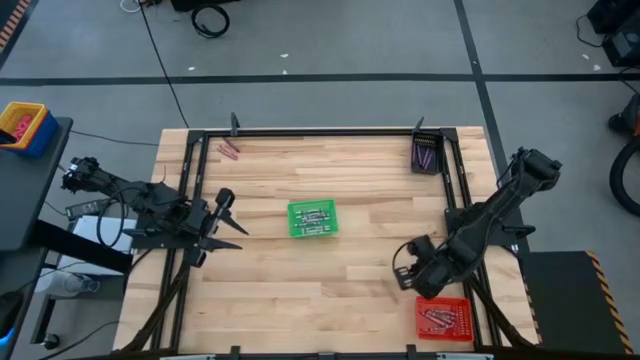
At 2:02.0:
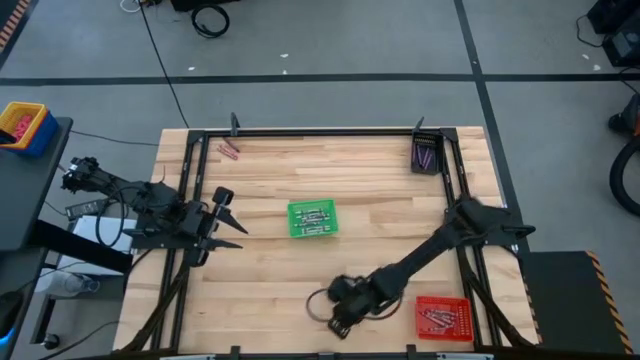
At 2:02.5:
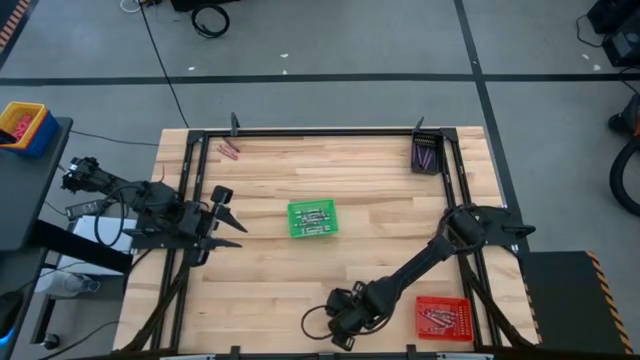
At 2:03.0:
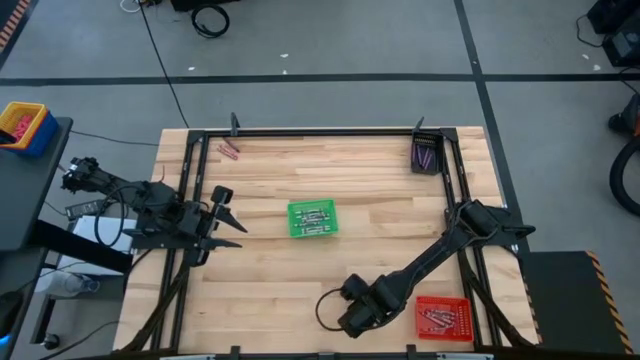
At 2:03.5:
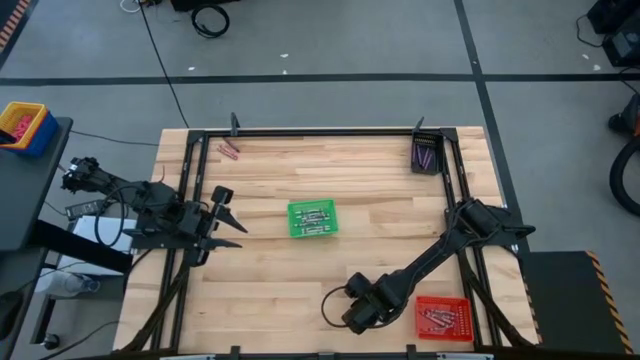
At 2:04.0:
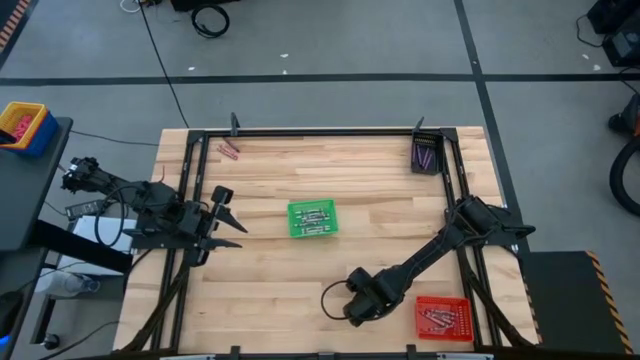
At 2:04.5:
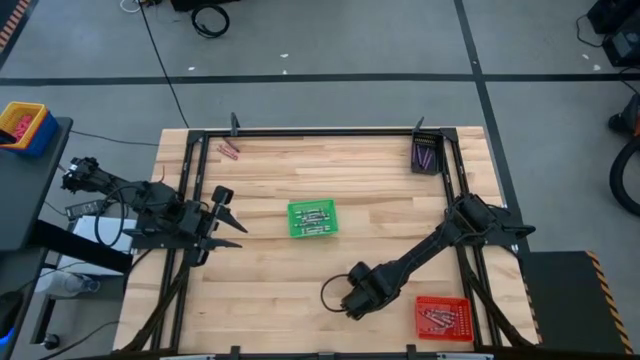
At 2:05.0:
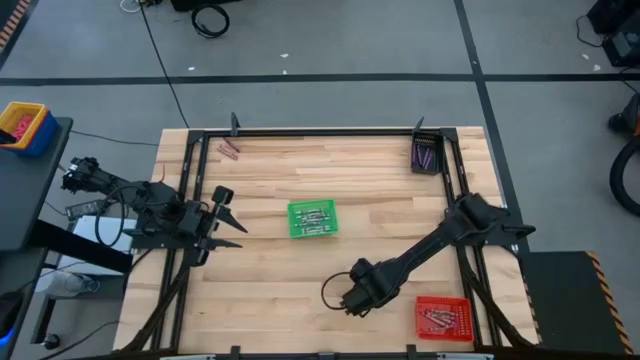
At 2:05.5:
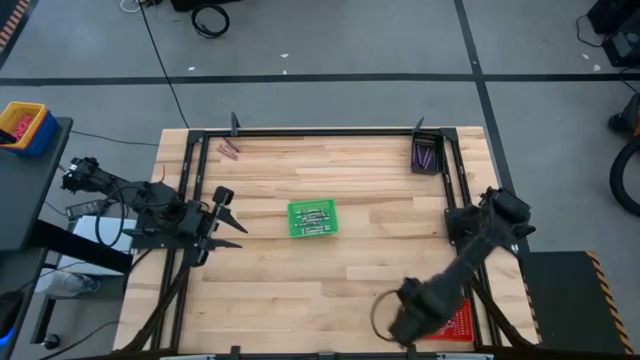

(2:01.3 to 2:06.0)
Task: Sort crayons
Put the pink crayon into the red basket

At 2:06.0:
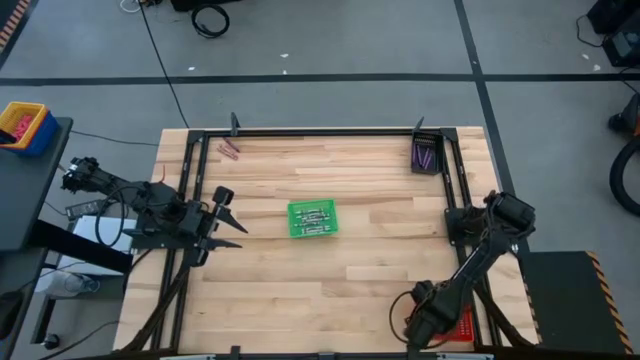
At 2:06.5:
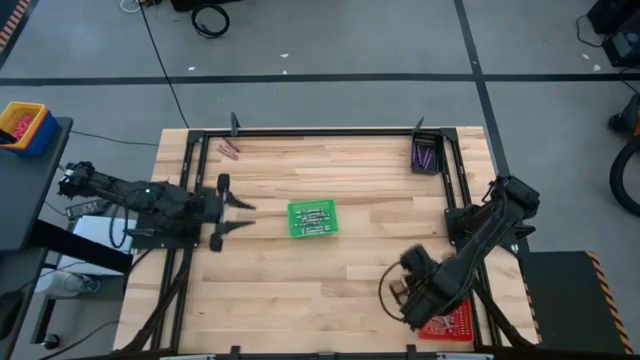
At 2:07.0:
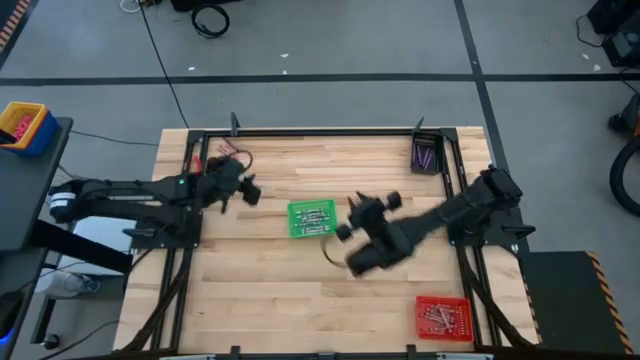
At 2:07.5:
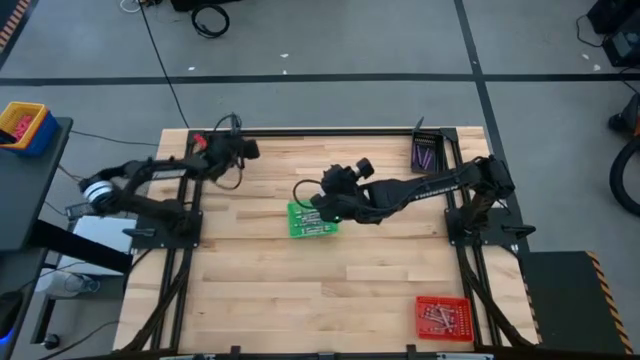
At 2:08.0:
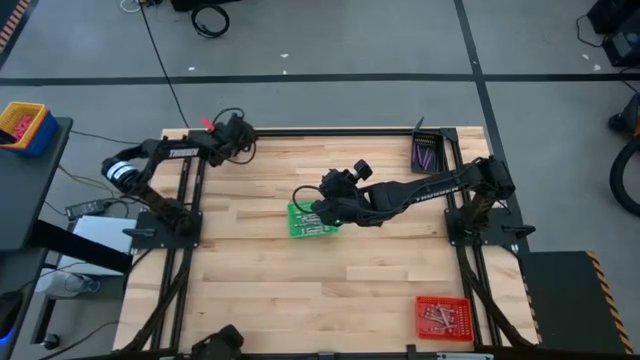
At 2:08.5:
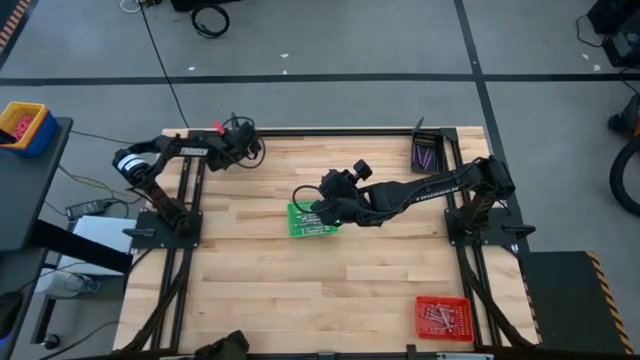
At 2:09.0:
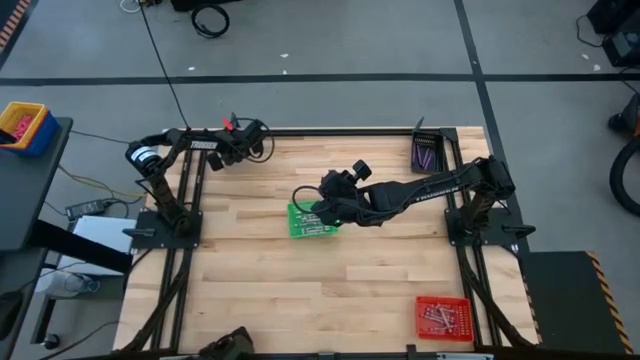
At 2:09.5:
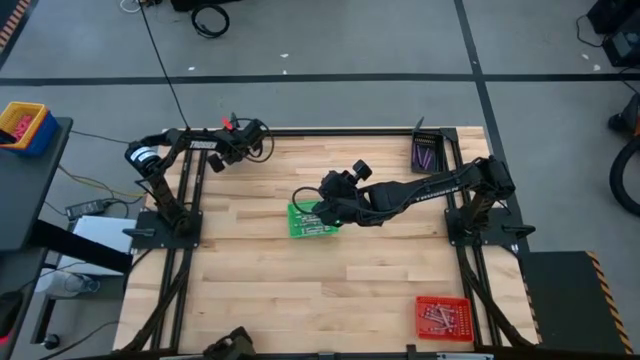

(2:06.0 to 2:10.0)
Put the pink crayon into the red basket

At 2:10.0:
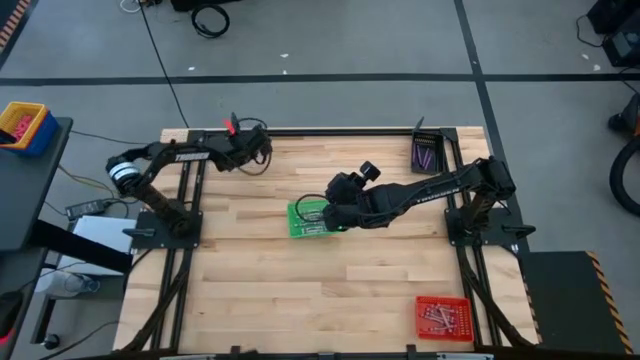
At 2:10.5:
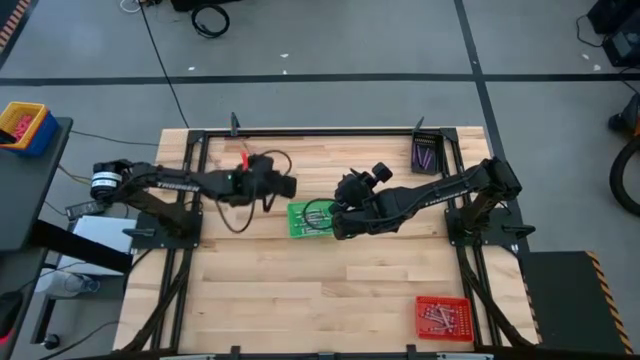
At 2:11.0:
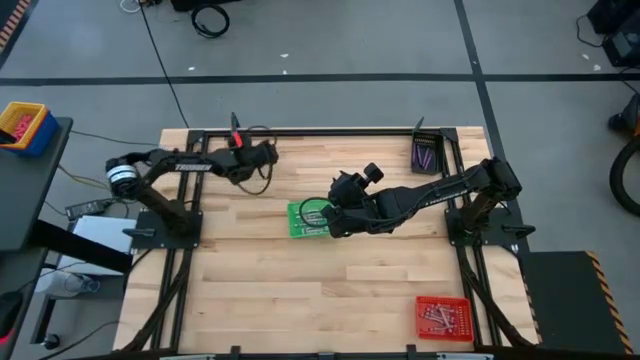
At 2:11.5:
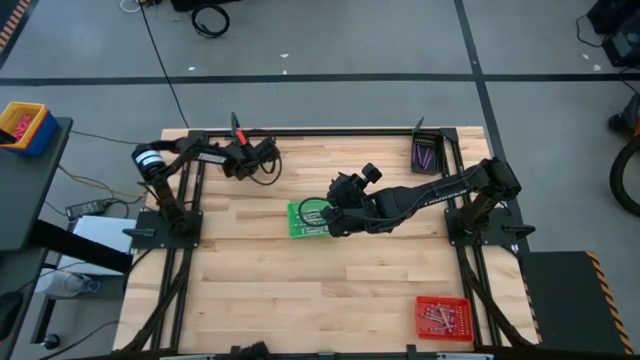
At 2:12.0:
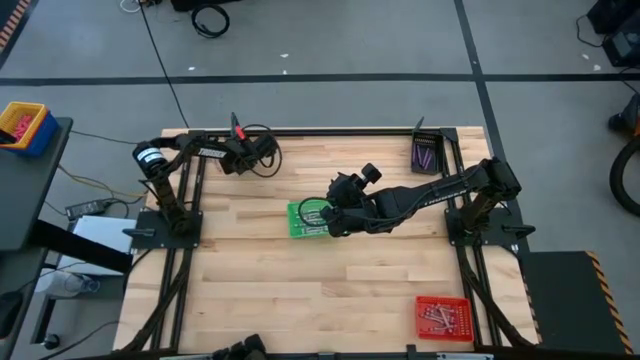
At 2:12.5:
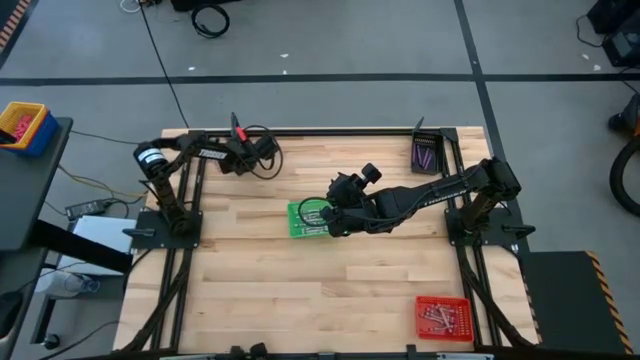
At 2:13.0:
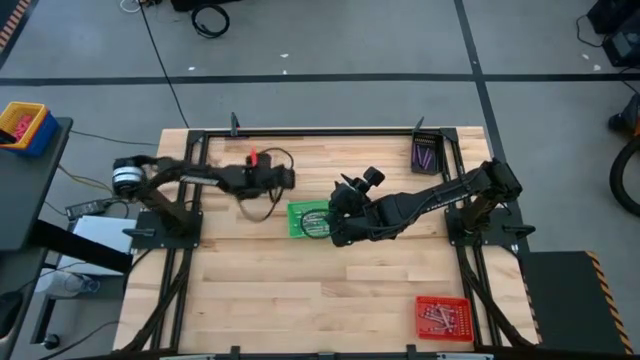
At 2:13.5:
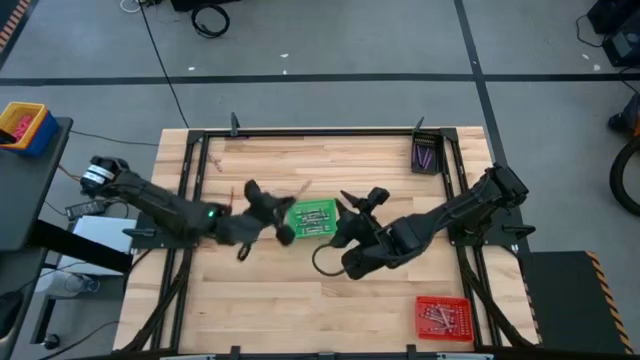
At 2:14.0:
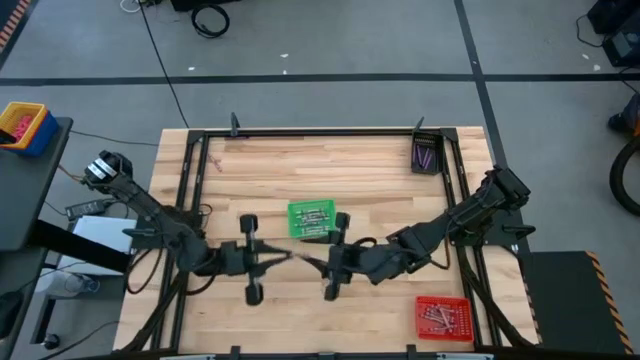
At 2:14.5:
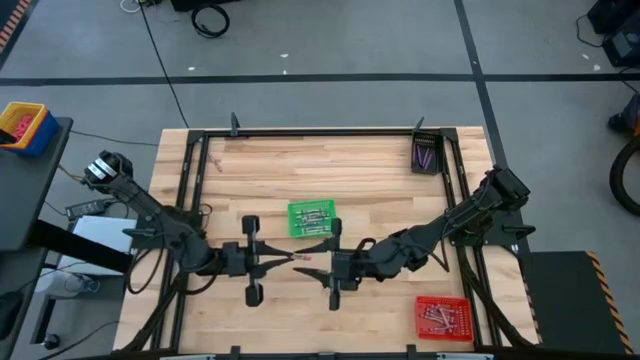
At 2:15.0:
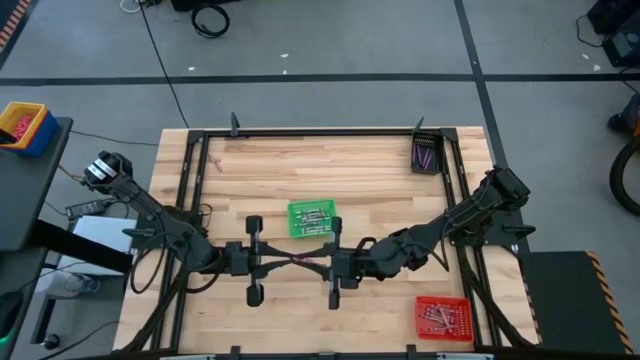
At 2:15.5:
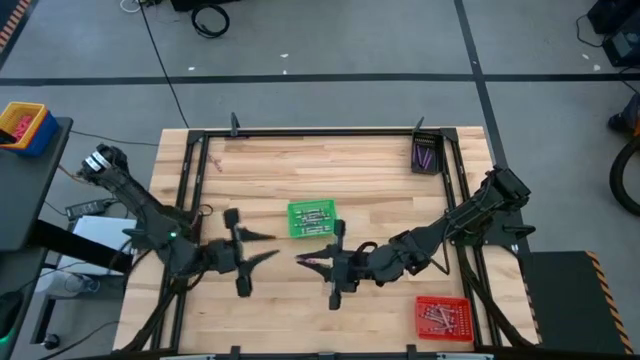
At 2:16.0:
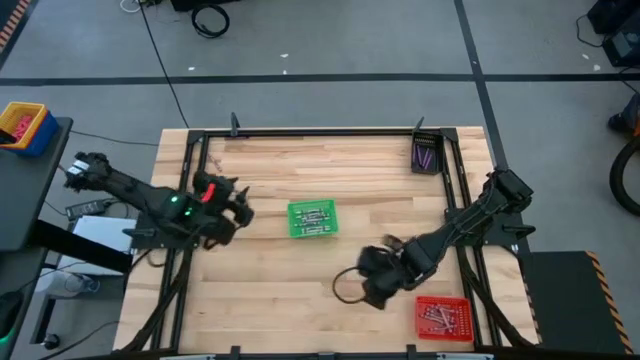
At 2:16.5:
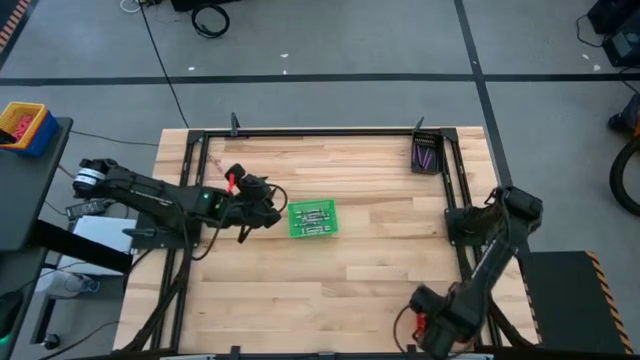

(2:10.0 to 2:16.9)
Put the pink crayon into the red basket

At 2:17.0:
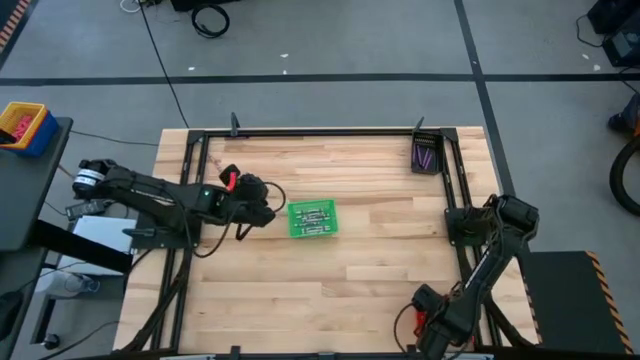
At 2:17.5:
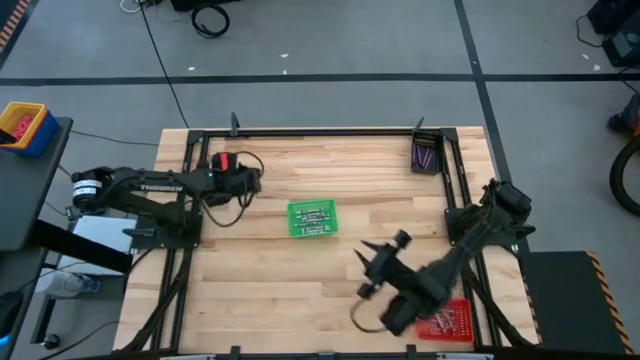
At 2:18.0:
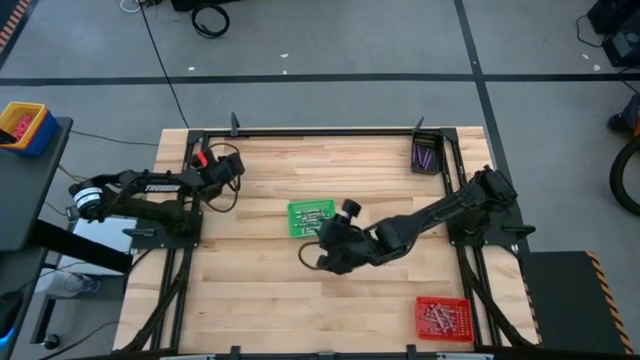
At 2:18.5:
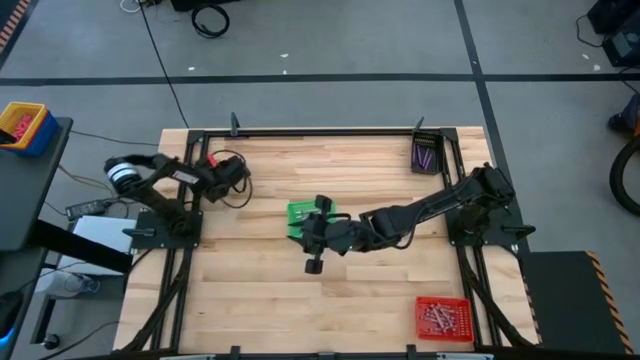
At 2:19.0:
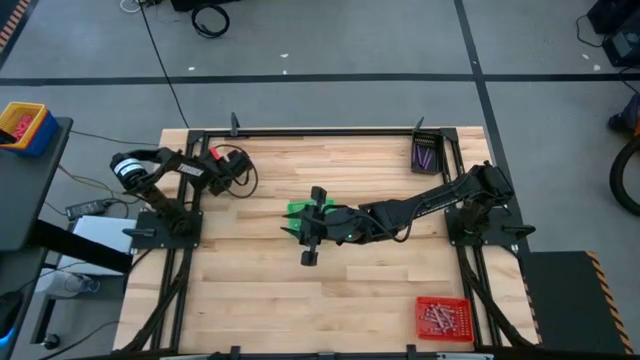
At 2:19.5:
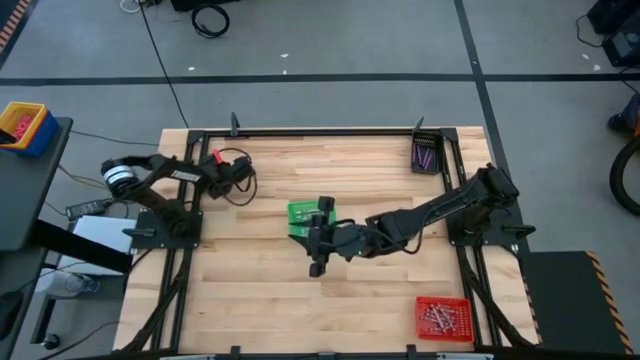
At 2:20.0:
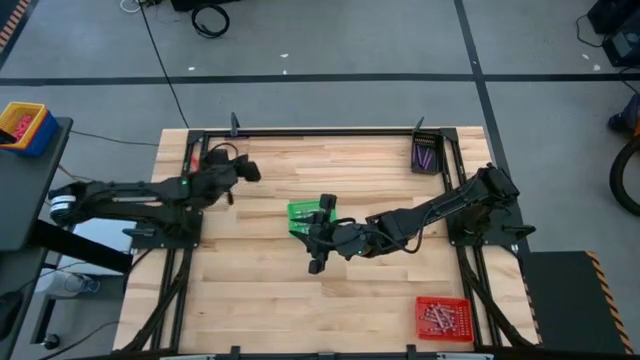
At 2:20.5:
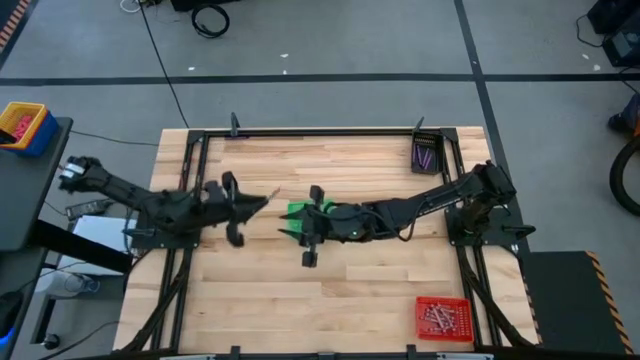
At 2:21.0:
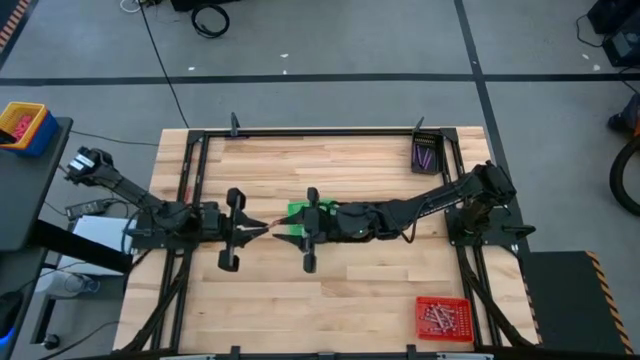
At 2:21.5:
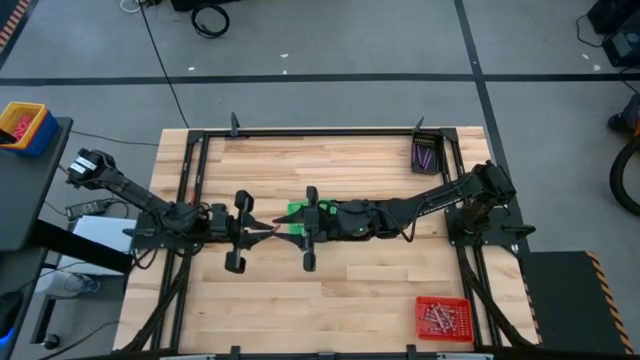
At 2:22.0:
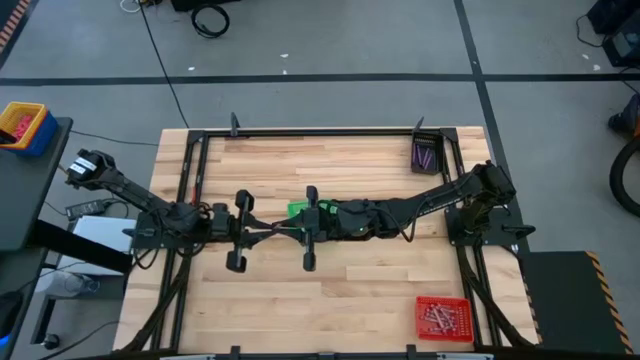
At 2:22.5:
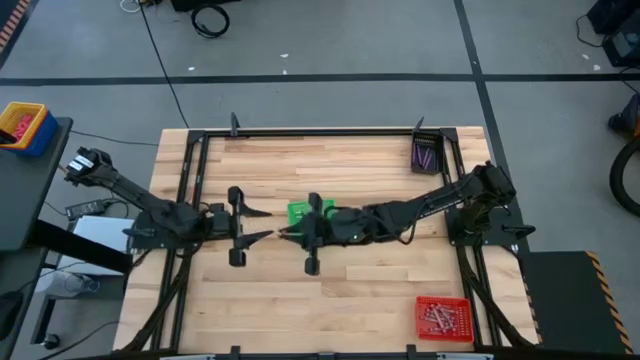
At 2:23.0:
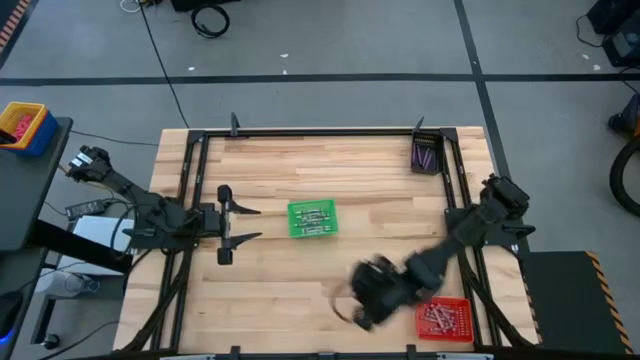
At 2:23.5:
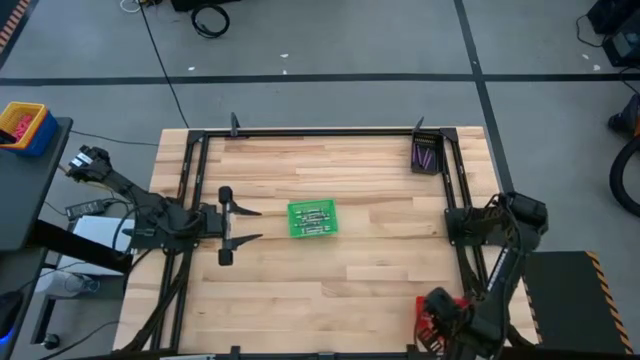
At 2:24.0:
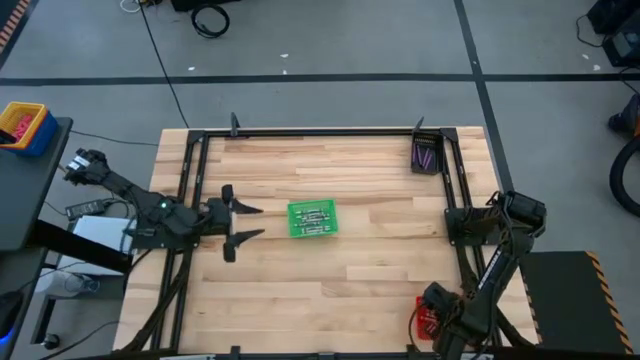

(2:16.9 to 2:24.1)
Put the pink crayon into the red basket
